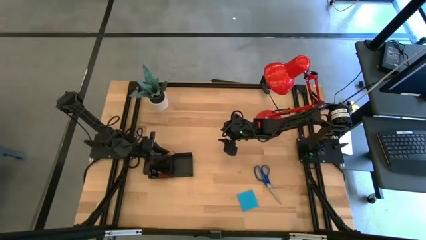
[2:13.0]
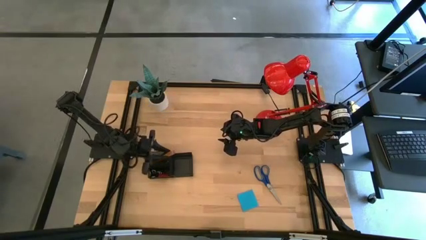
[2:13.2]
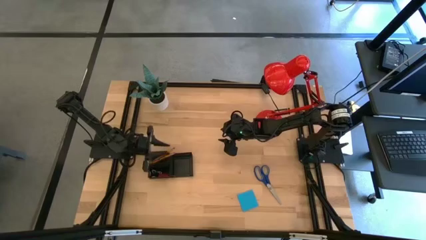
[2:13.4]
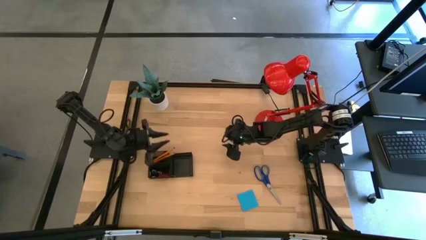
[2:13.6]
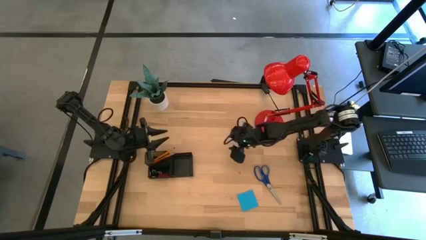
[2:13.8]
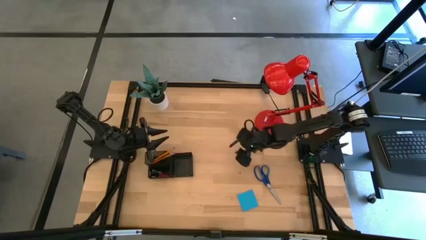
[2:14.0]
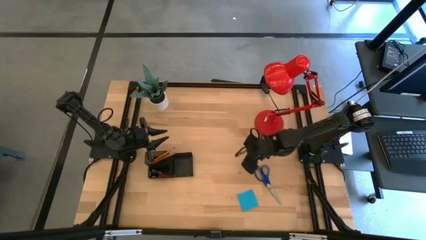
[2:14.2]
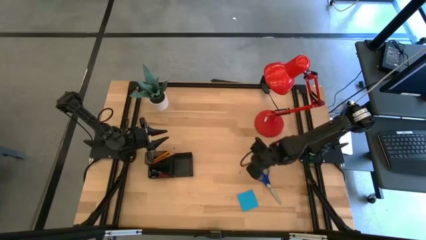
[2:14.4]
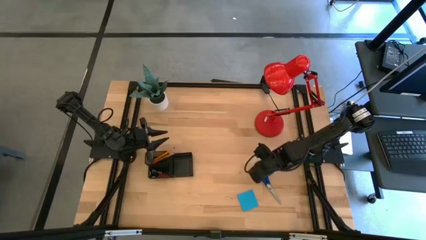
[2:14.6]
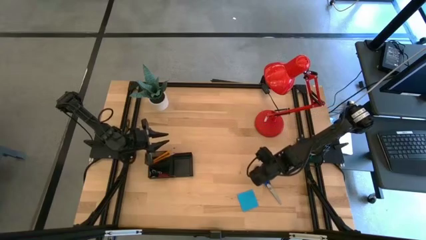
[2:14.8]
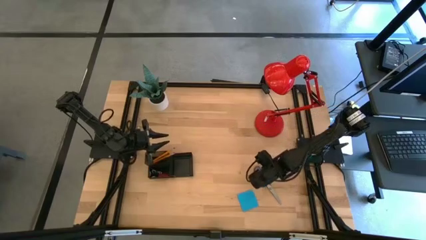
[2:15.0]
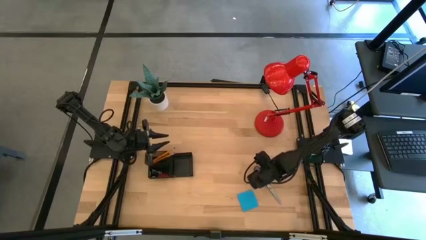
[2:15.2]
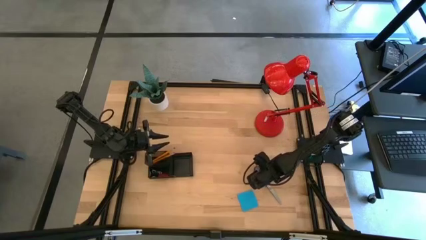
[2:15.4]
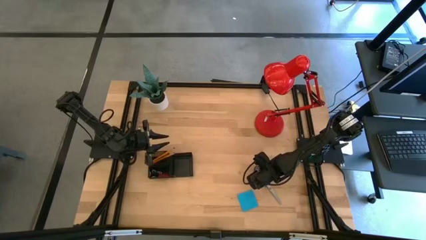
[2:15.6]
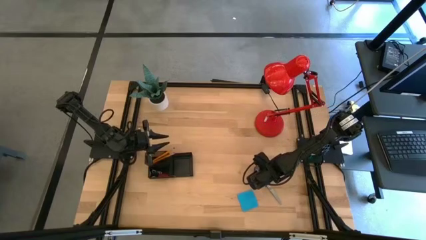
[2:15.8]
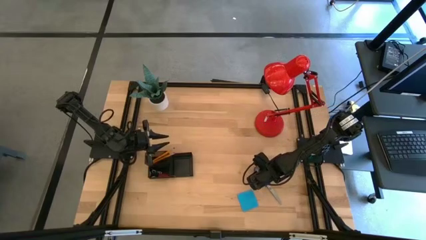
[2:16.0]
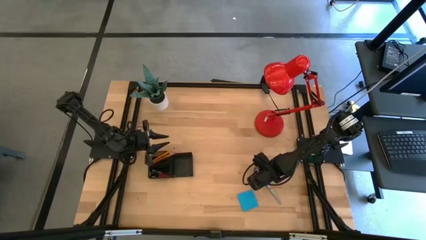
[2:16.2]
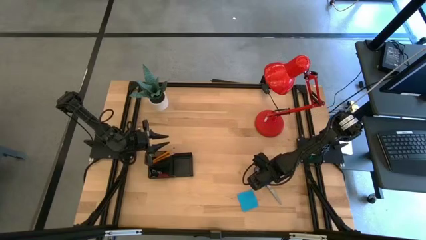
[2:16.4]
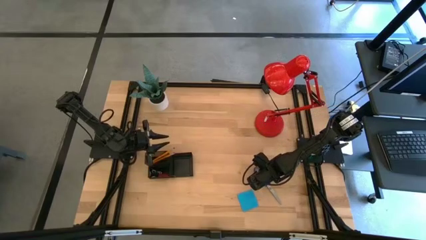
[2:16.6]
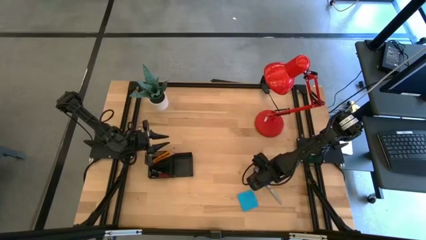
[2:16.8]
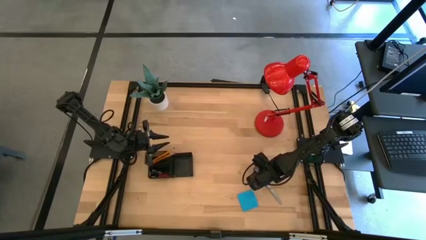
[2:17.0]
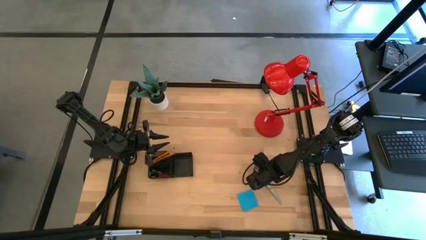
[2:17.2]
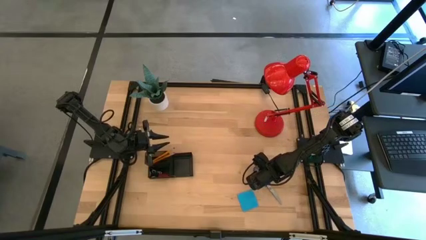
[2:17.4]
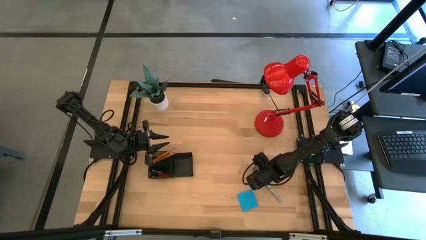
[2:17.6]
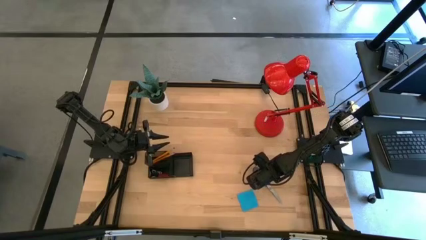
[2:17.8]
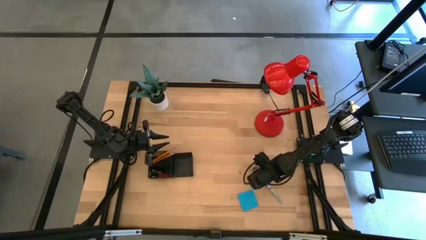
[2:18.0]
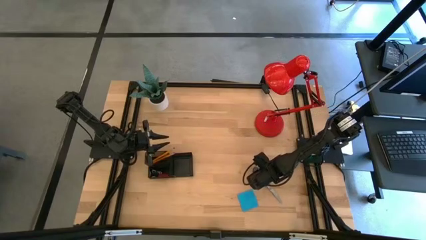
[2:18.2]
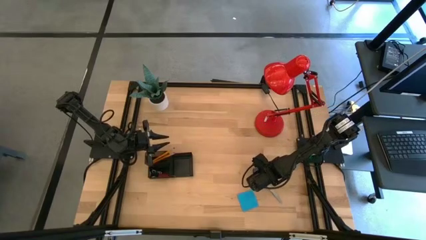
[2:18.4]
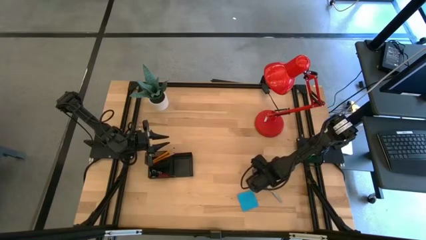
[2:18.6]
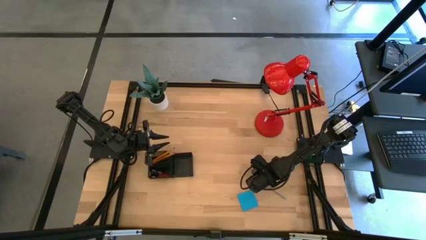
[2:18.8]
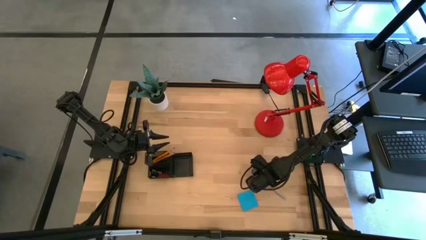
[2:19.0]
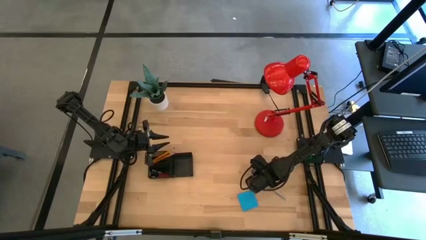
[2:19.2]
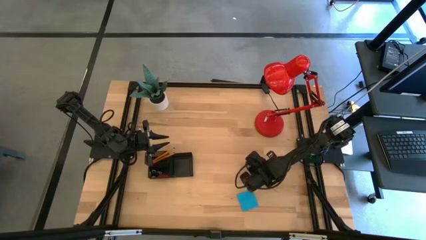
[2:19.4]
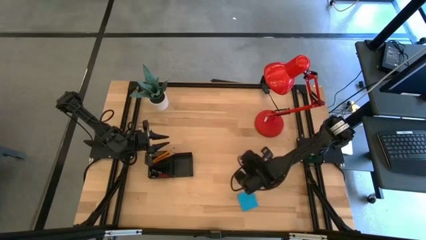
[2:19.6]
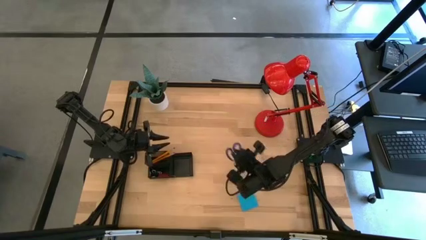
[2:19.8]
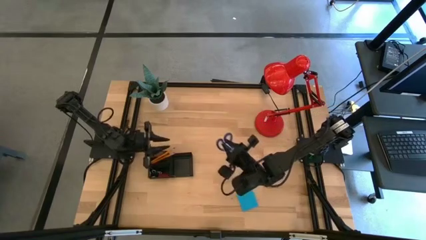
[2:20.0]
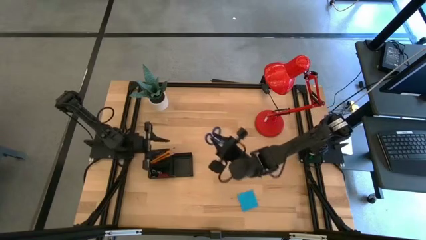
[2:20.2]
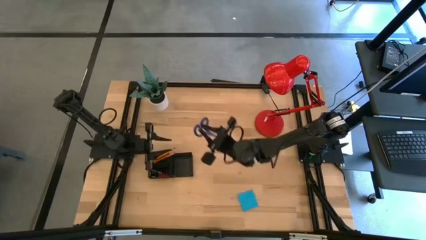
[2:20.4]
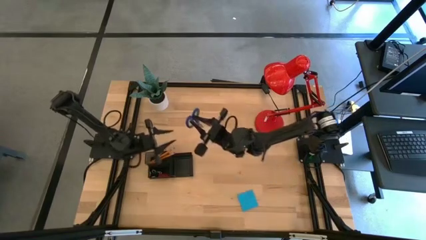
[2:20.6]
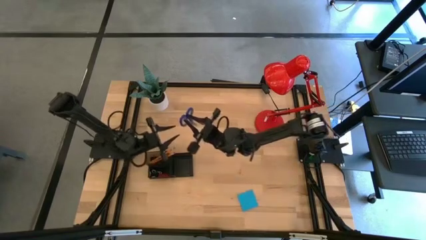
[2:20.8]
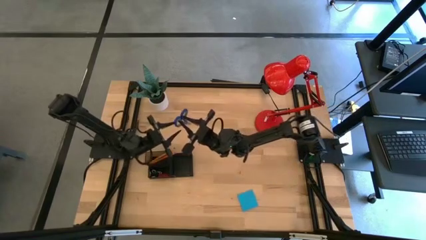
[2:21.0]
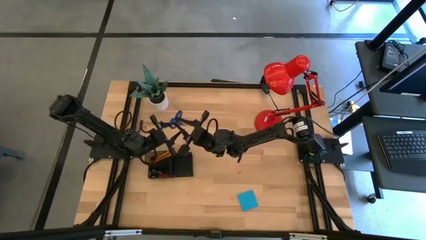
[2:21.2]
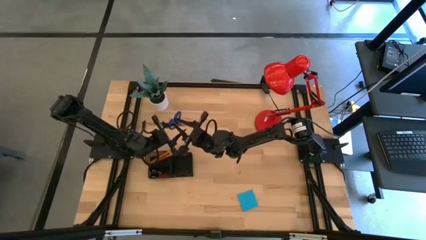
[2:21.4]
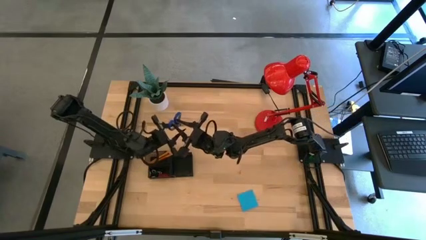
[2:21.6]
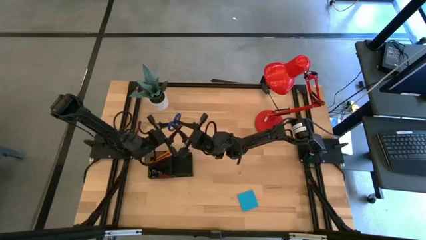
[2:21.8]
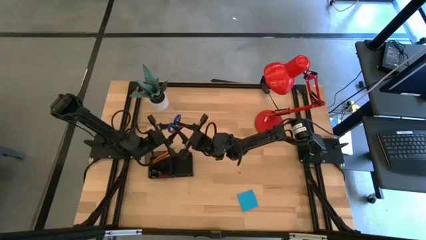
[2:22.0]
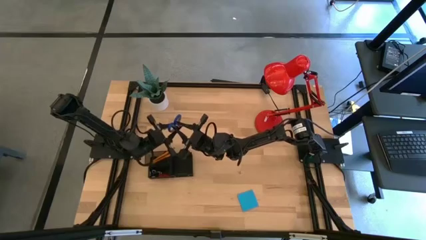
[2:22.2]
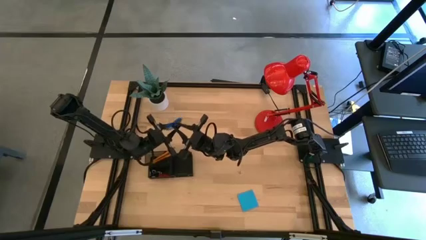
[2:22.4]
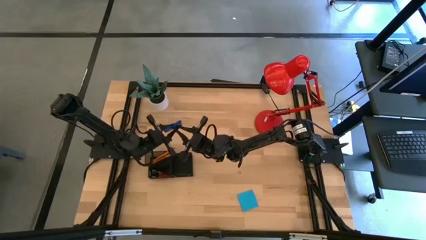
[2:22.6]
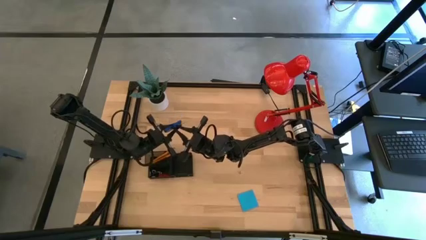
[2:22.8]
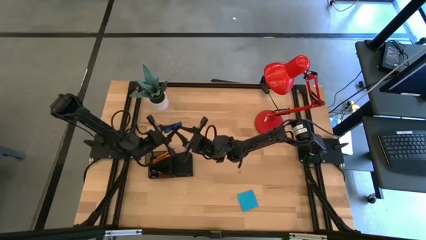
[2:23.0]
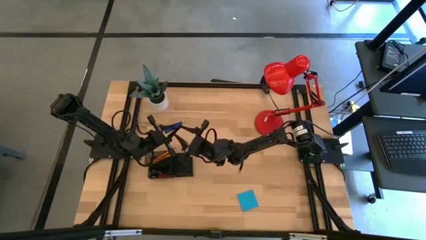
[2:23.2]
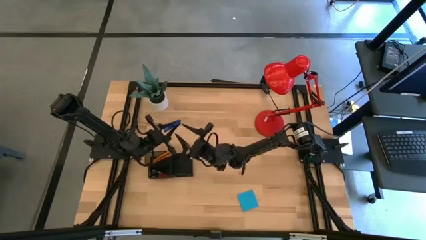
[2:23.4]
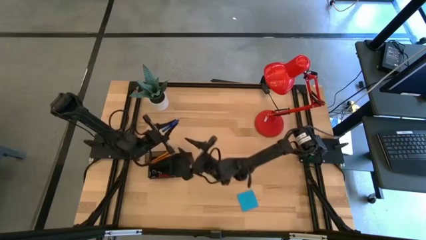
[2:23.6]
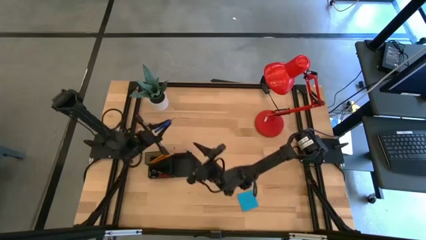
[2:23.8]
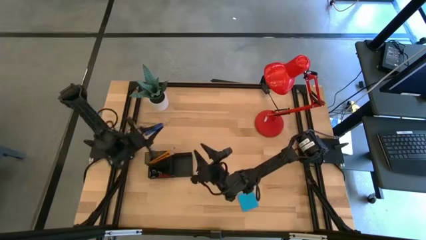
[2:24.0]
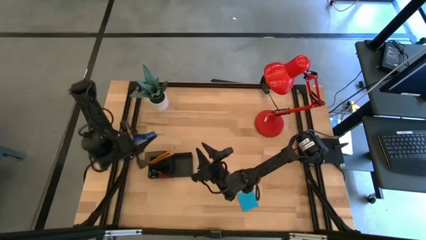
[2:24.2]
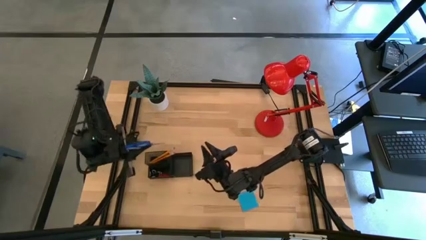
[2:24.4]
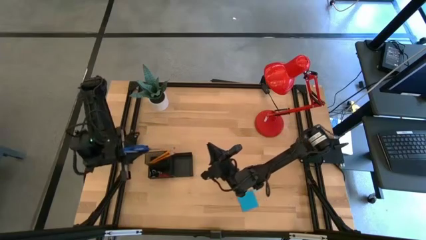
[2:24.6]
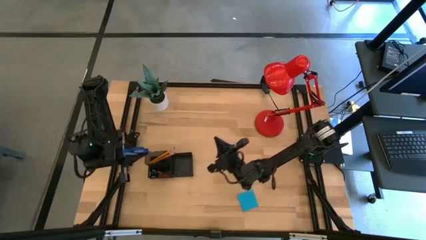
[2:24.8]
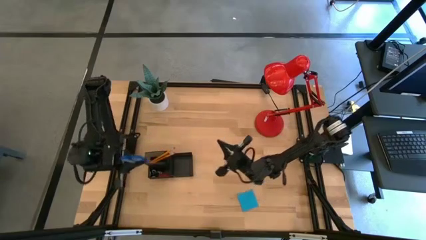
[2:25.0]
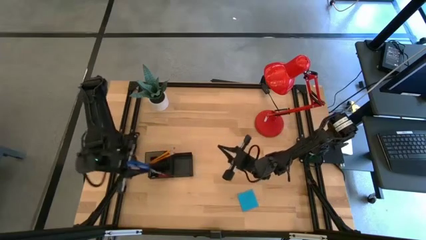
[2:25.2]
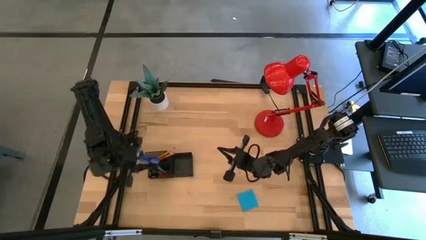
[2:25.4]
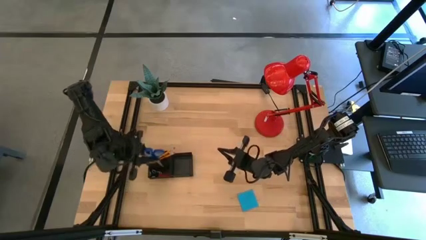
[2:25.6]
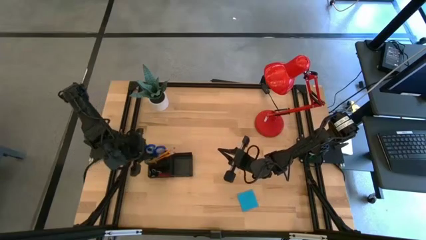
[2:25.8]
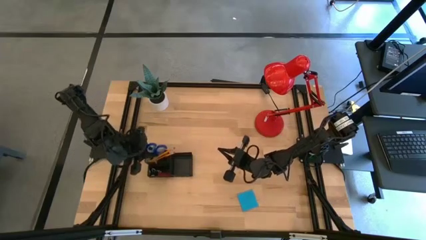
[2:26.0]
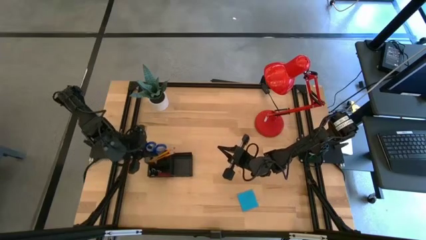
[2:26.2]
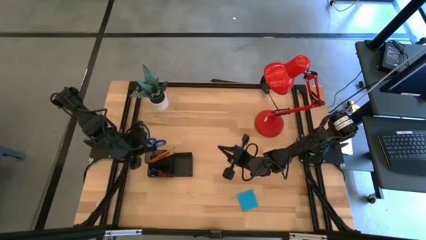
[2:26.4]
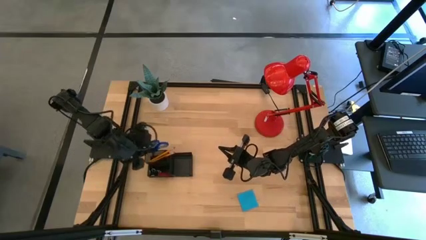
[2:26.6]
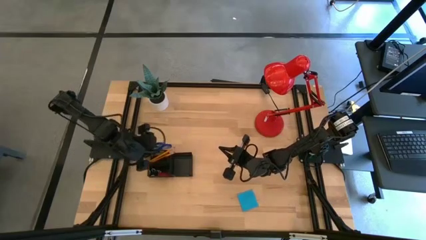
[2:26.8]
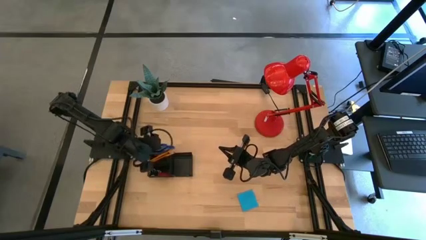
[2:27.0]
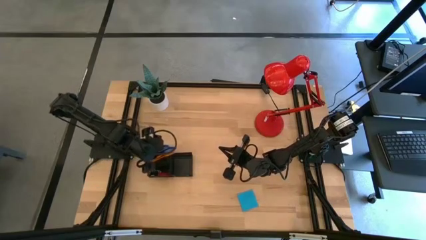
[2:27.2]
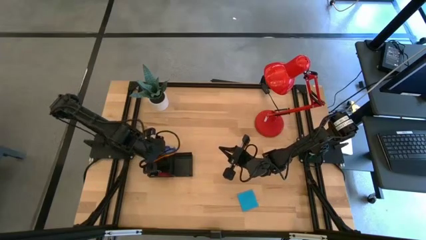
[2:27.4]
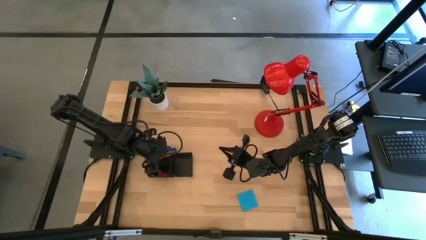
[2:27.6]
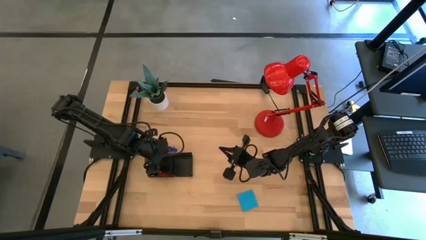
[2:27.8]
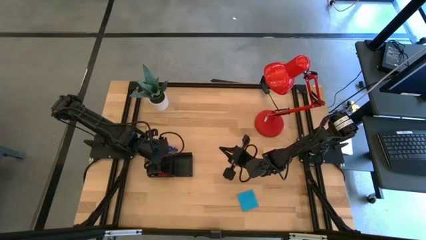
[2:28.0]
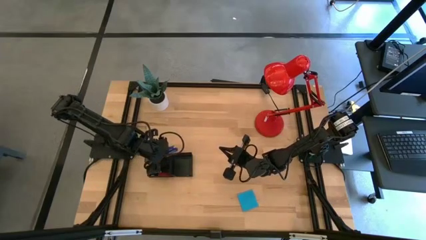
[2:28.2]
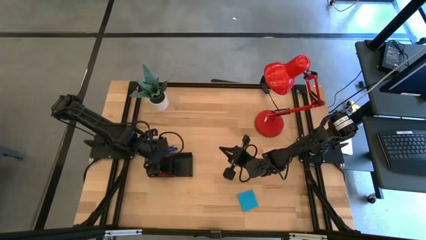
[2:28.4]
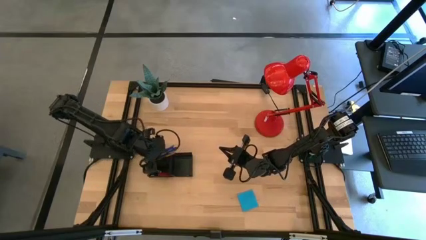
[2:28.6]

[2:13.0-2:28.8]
Task: Pick and place office supplies into organizer
Put the blue scissors into the back left compartment of the desk organizer
